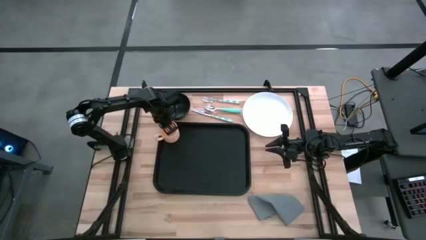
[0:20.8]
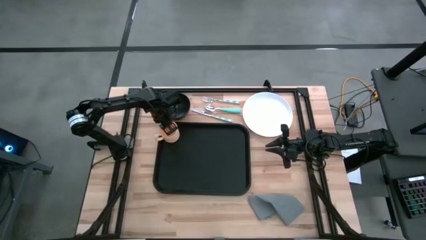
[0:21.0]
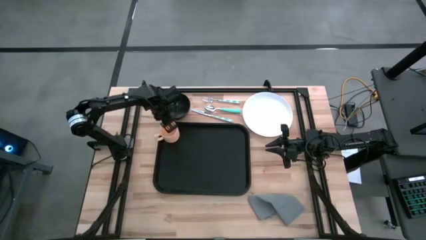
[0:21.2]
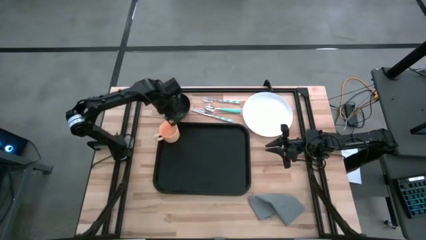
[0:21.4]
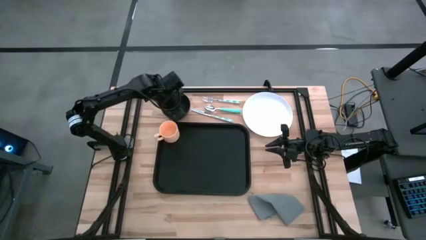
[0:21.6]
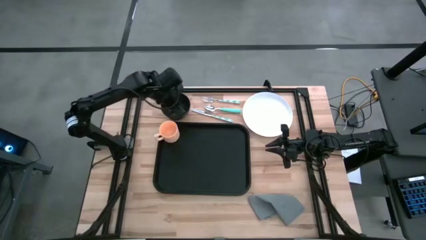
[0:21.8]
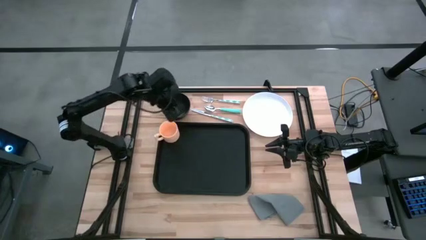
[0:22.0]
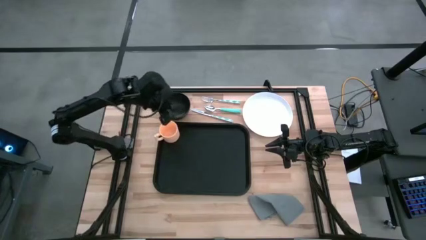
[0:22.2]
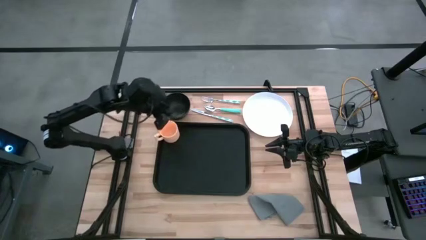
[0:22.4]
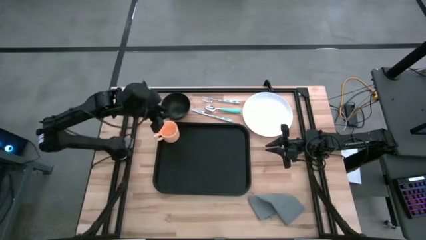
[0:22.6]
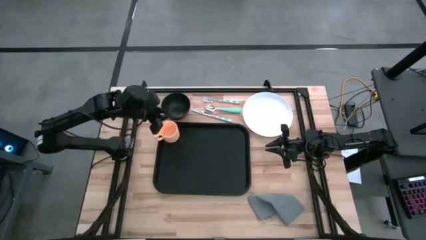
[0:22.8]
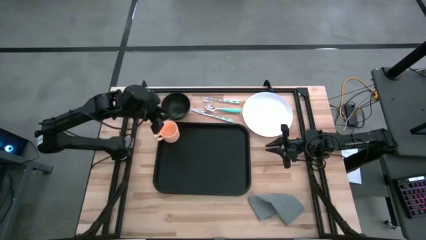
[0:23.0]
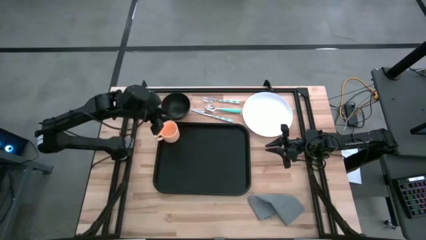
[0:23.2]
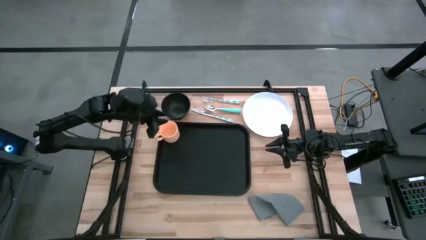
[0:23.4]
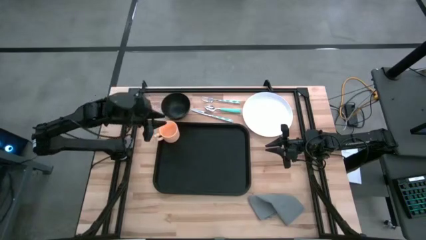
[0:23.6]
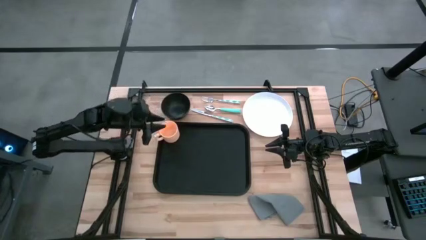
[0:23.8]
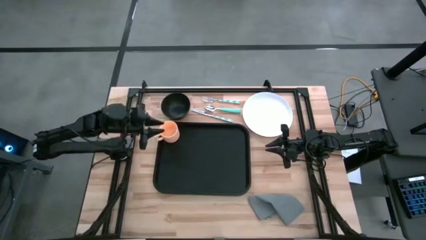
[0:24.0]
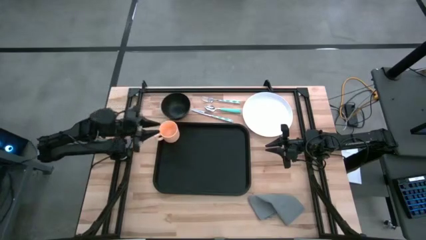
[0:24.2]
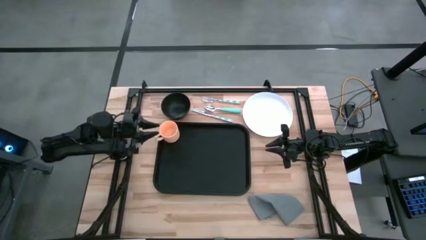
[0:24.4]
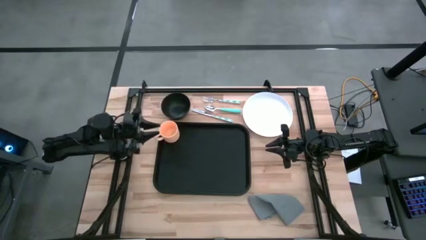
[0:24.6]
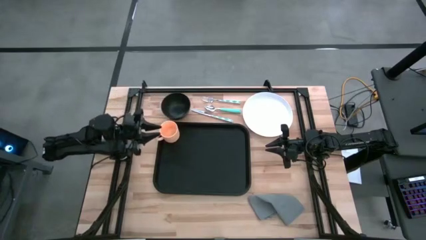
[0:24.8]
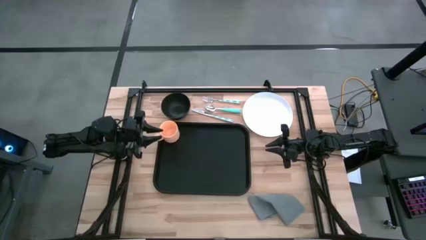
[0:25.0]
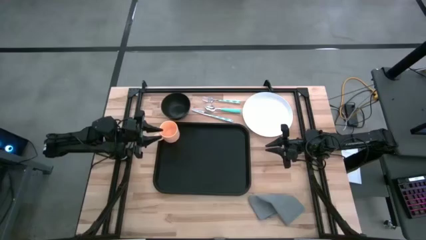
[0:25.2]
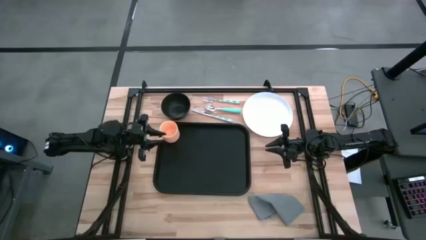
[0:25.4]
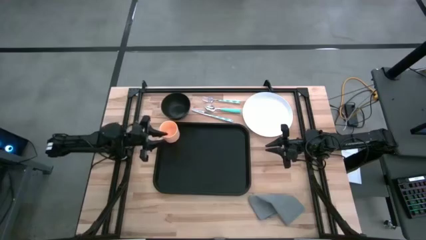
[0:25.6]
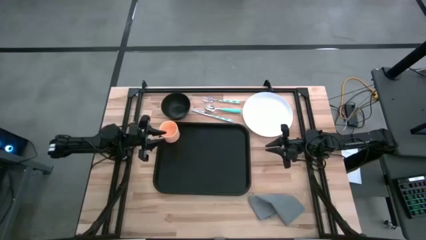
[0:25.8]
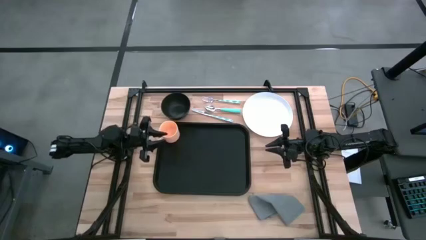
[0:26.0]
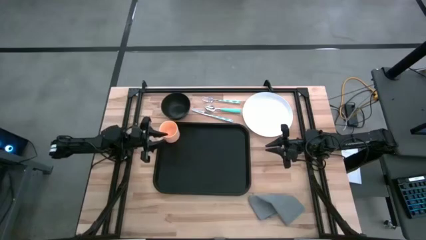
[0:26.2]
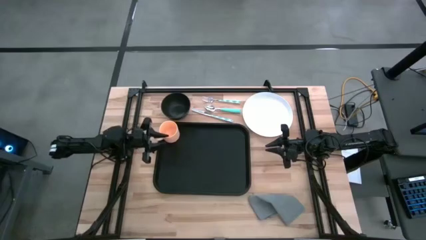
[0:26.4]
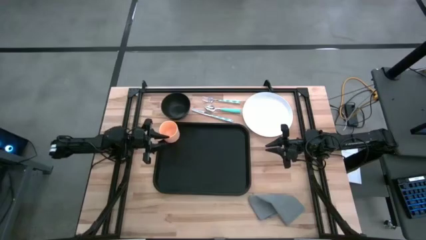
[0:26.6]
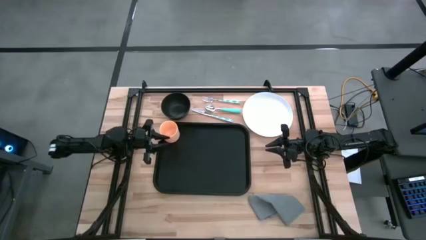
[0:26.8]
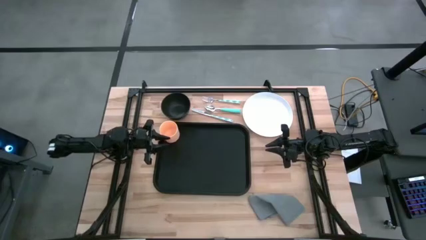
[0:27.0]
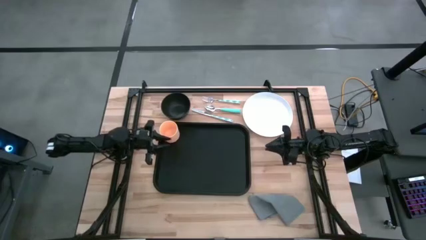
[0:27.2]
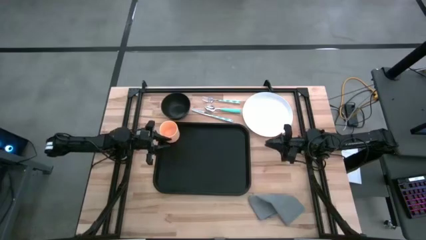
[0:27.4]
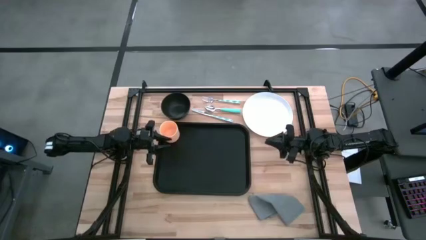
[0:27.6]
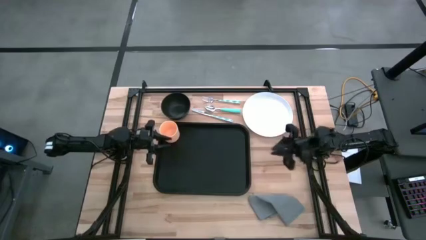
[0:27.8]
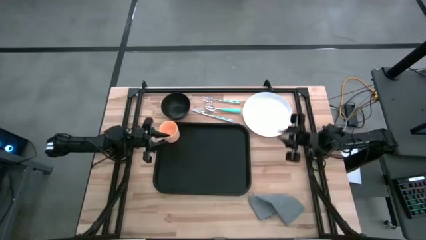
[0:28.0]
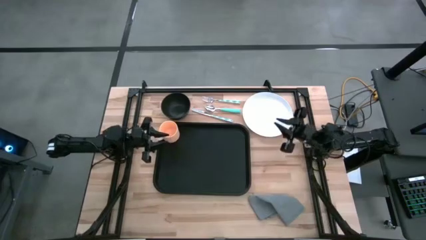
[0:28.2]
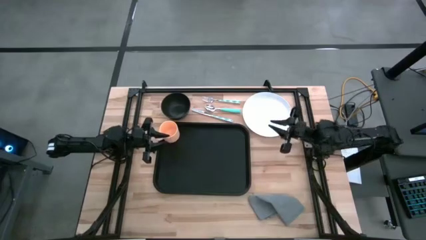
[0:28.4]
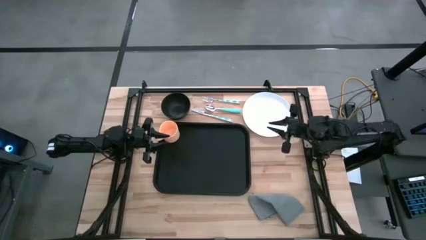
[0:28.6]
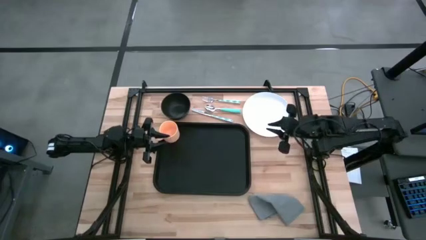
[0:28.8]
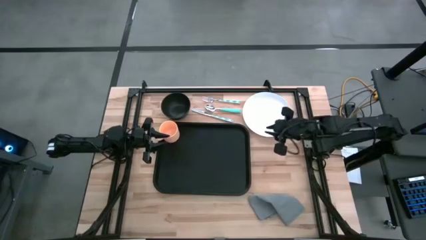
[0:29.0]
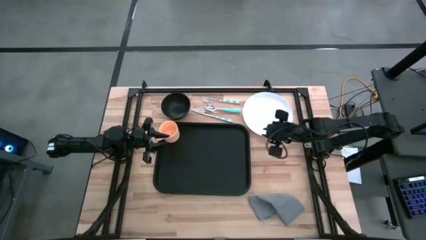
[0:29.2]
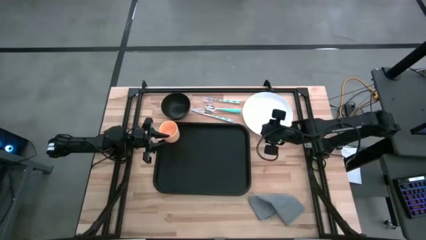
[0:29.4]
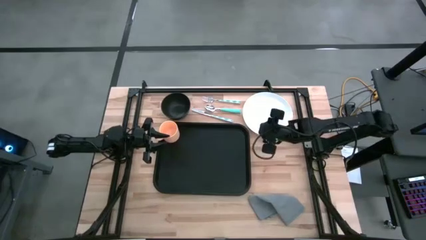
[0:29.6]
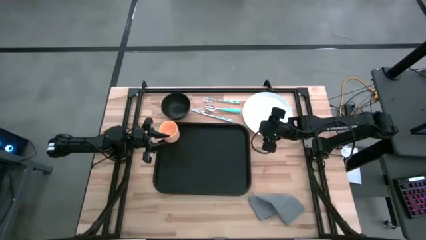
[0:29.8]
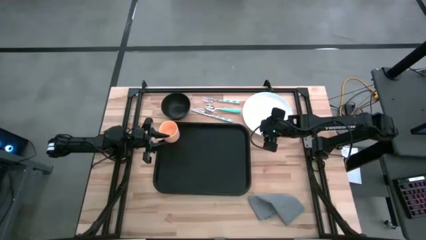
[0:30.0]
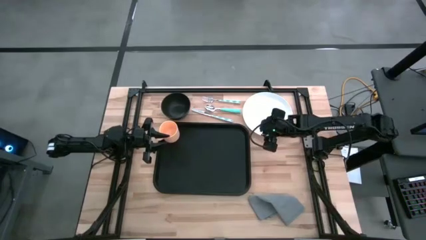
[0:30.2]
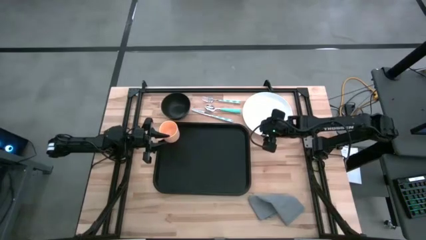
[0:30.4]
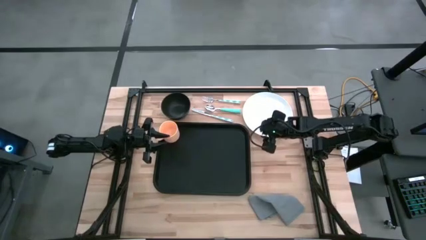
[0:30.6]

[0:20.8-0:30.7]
Task: Set up tray
Put the white plate to the bottom right of the orange mug on the black serving tray
